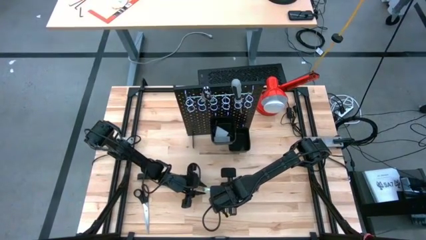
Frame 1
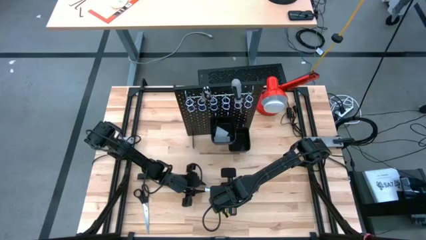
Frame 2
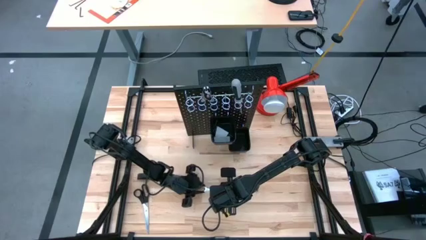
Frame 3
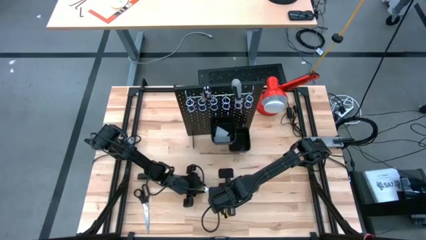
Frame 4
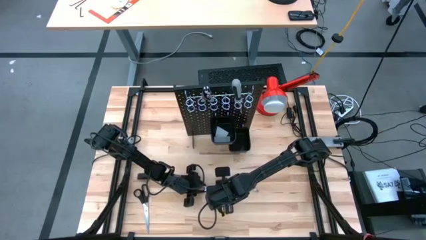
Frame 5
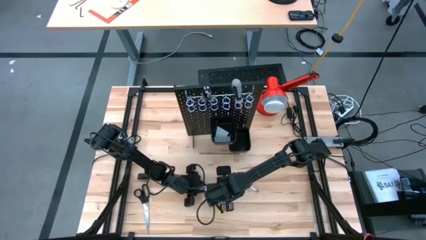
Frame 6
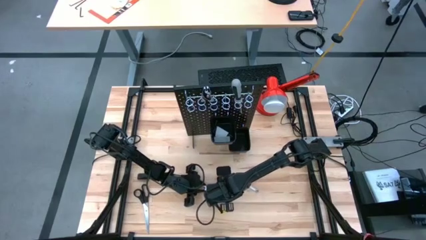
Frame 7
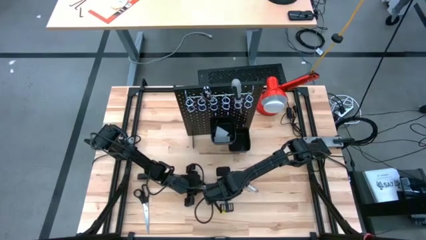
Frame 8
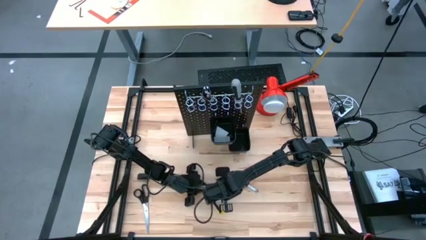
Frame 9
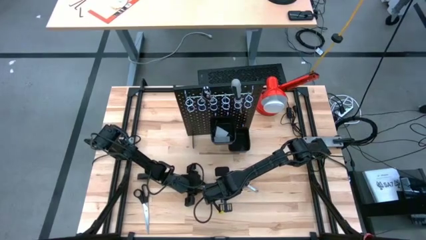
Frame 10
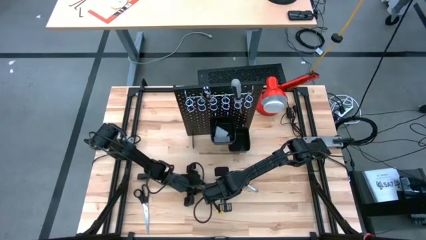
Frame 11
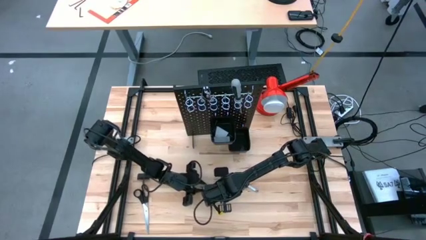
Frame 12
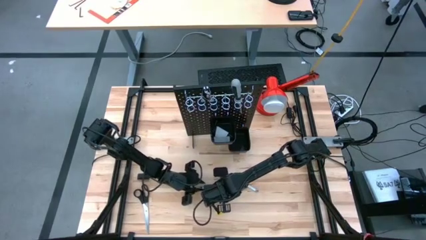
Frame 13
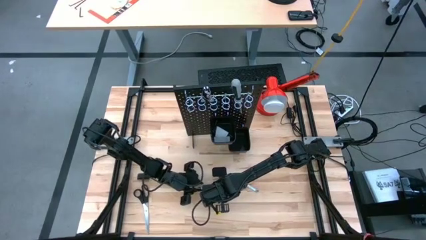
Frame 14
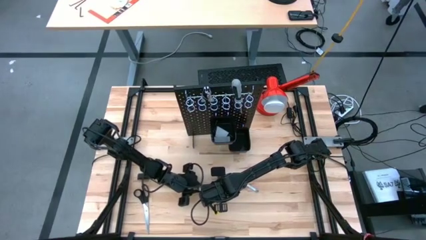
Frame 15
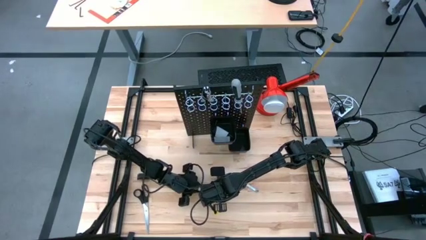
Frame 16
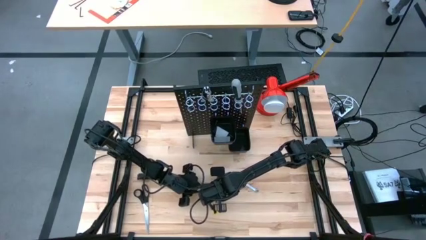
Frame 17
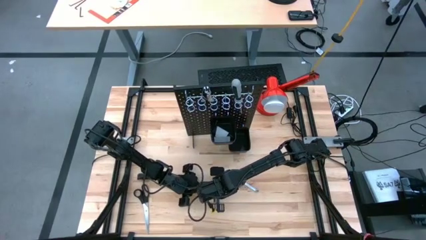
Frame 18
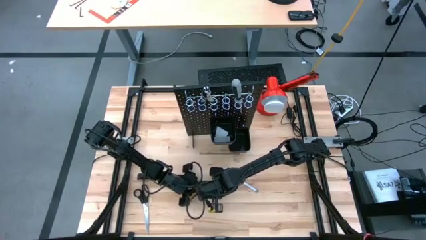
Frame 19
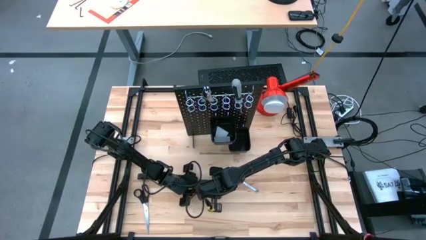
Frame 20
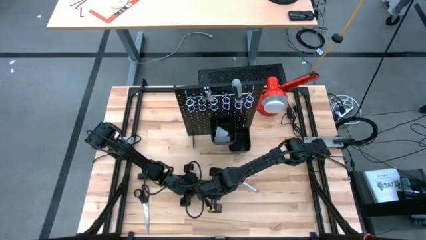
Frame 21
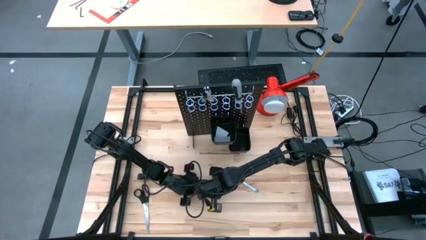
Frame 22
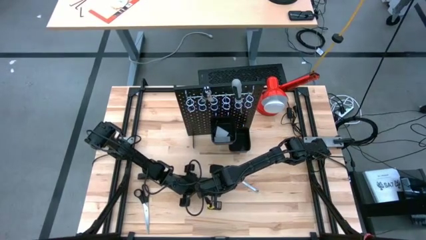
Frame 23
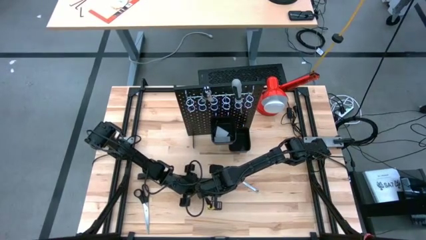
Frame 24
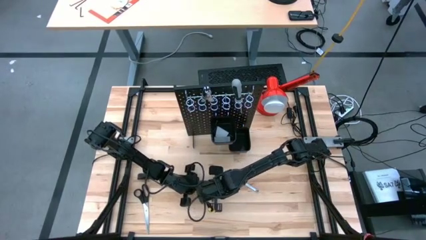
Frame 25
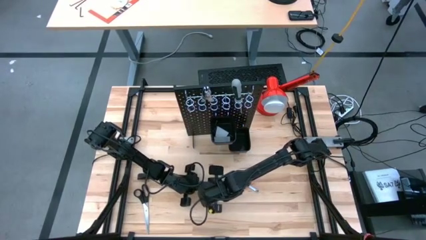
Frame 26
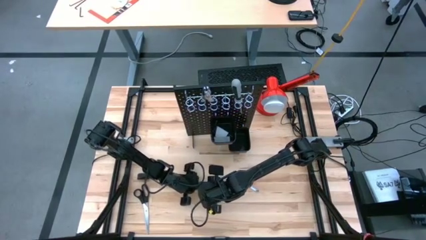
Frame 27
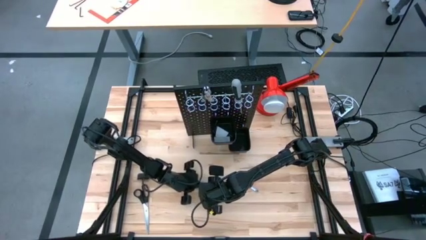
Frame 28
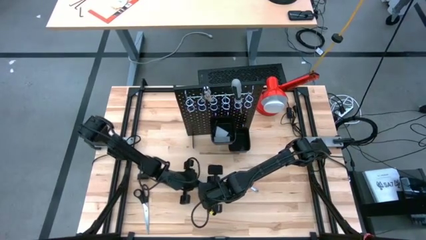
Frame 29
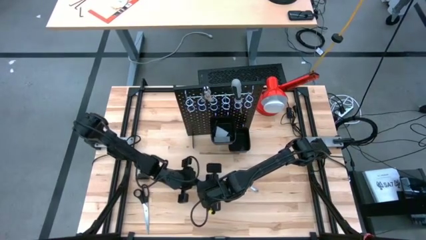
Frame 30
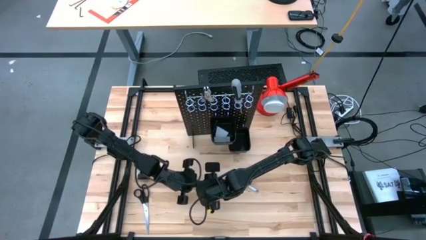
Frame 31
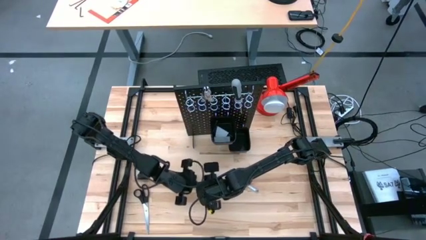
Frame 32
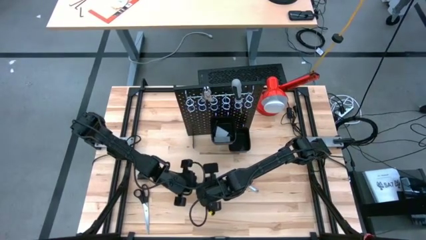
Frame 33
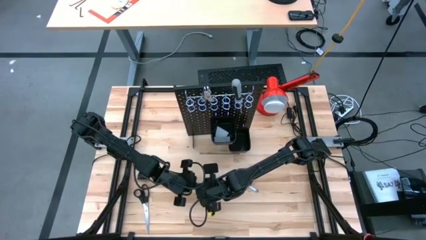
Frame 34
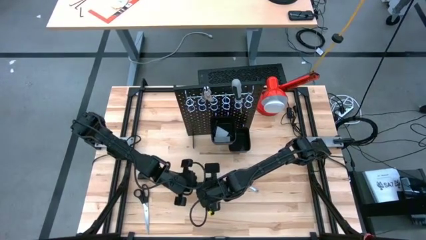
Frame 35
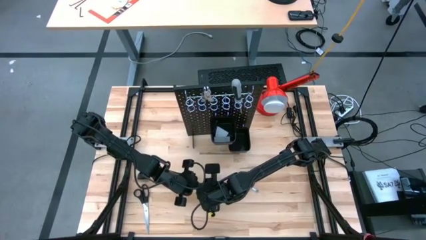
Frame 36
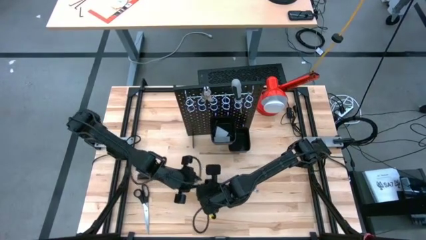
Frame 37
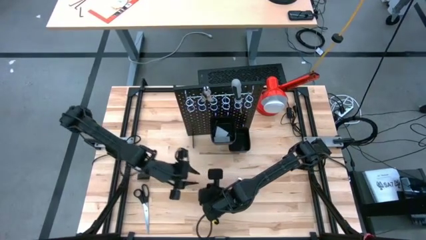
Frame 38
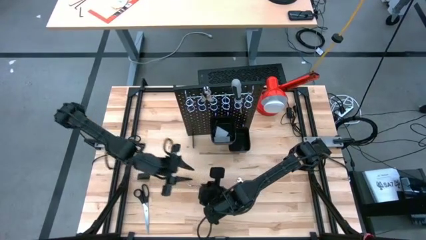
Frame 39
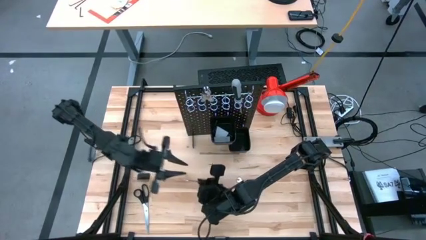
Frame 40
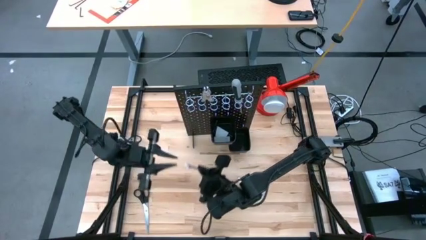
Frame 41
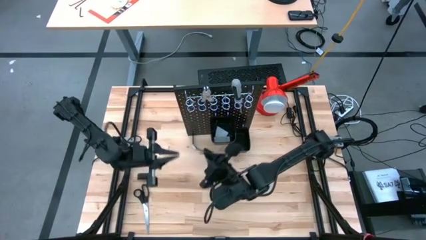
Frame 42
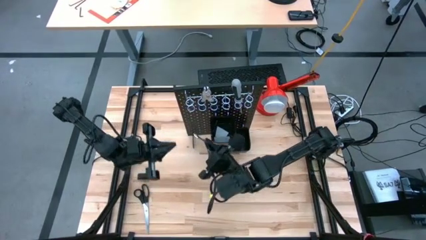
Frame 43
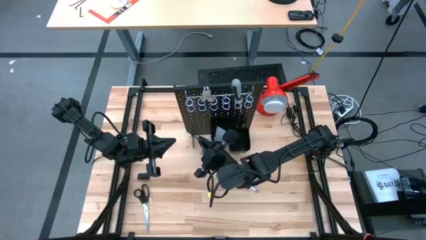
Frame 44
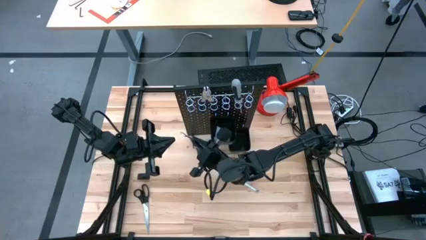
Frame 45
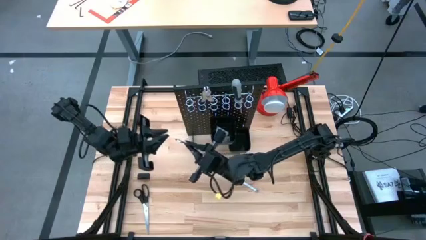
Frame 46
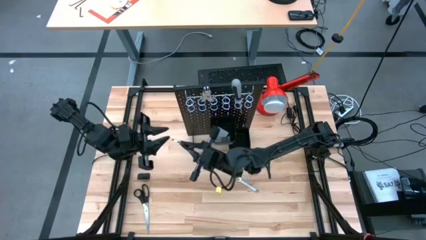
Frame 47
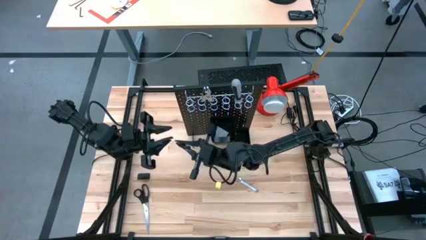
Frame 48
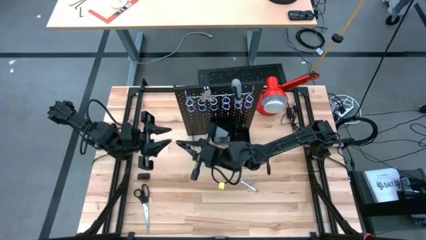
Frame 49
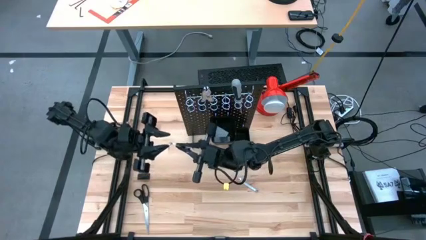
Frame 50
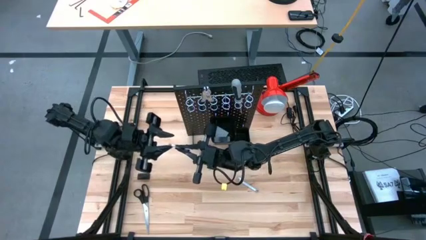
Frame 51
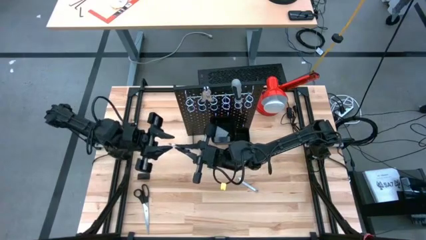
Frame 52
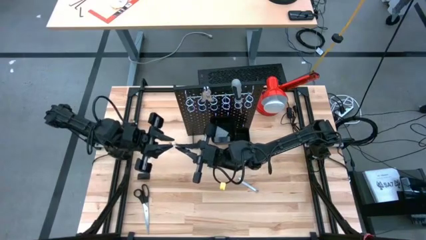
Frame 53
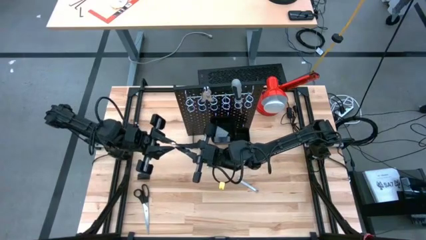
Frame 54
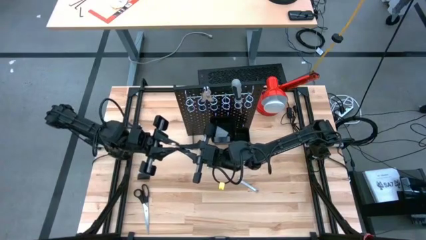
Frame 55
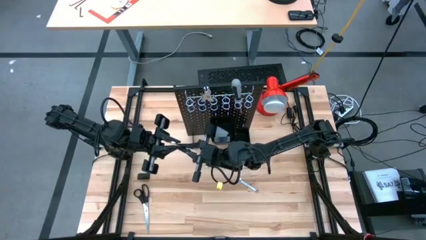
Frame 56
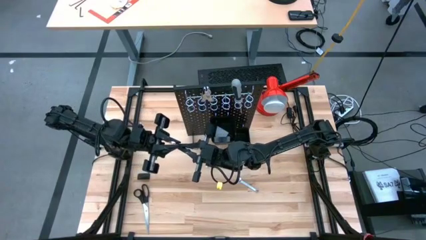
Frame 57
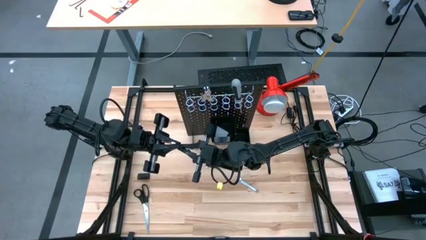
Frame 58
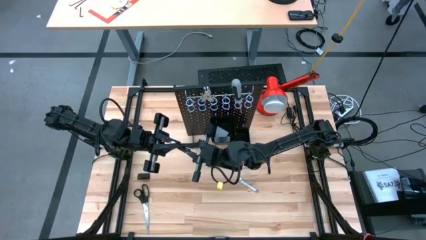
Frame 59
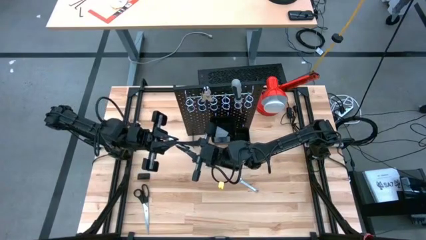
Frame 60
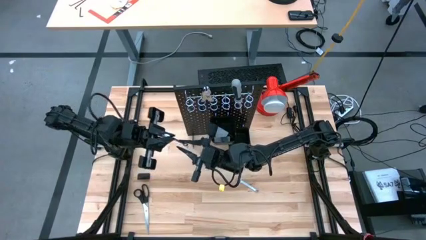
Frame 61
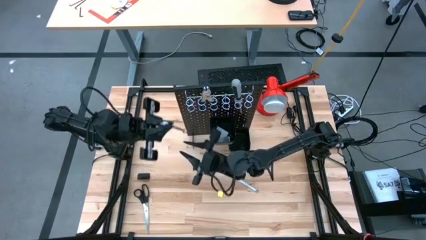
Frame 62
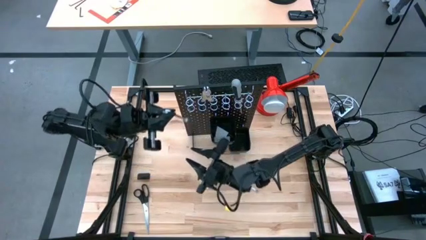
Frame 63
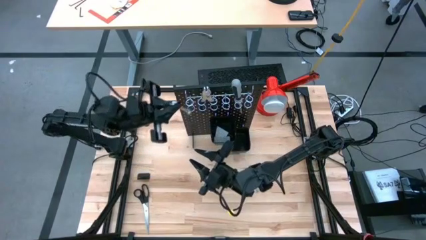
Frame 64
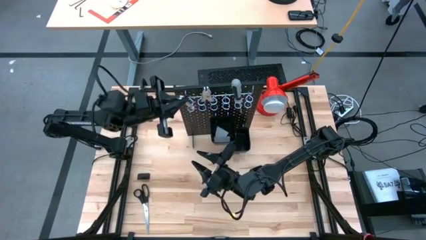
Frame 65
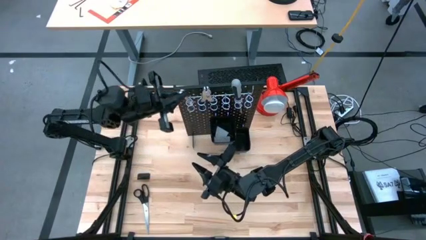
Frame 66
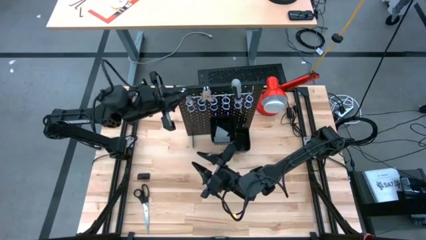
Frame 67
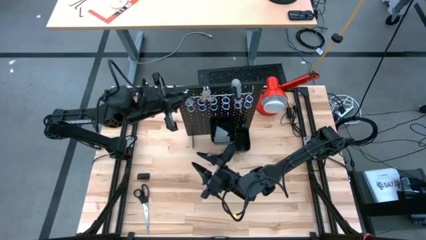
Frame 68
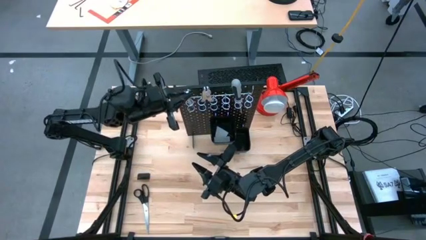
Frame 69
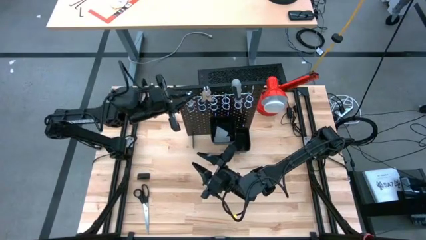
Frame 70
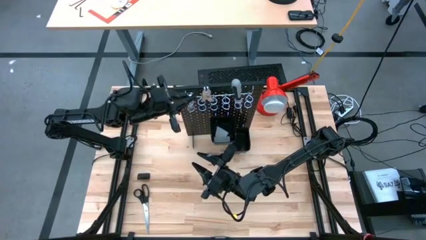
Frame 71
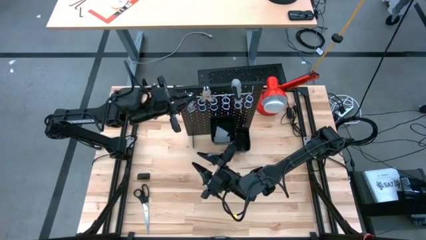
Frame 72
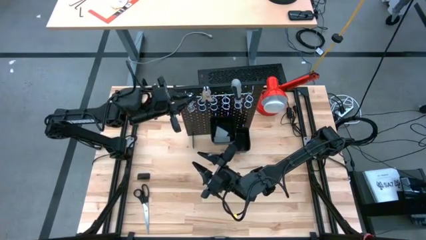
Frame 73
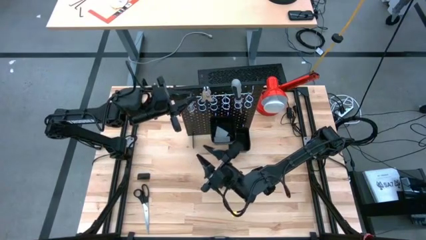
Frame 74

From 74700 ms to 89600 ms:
Task: Hang tools onto peg board
Hang the wrench on the pegboard
